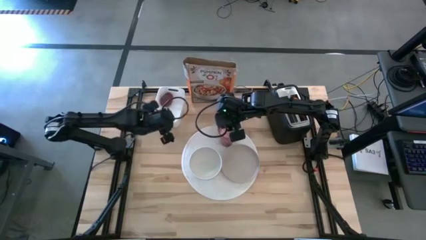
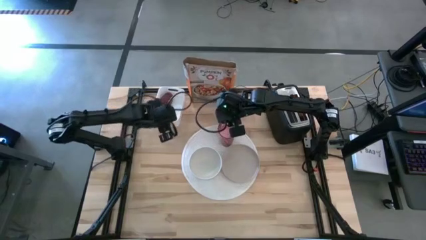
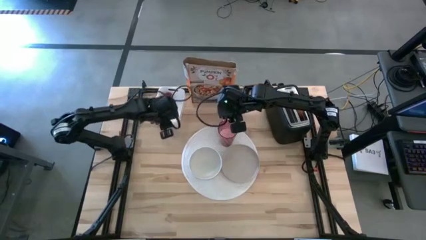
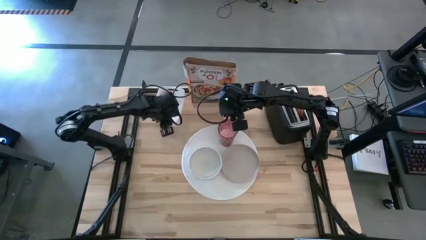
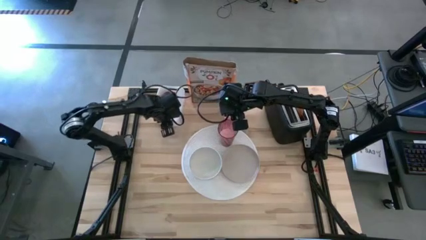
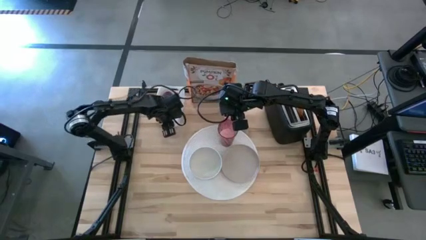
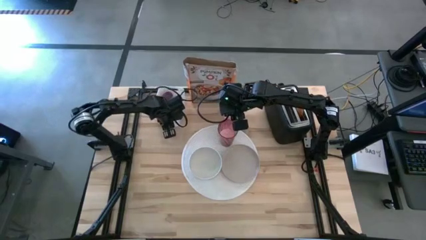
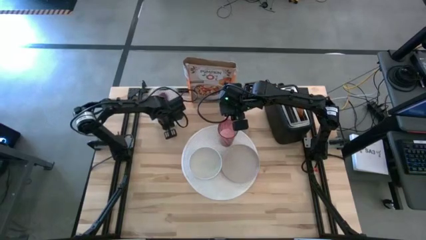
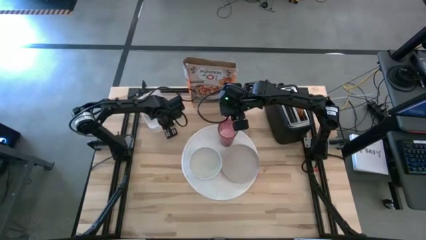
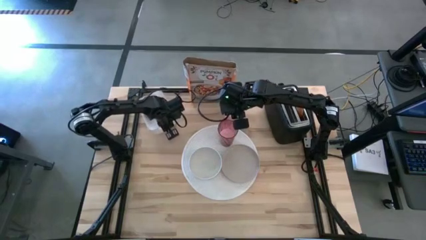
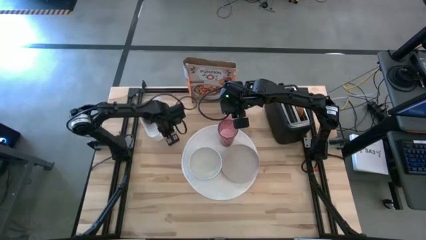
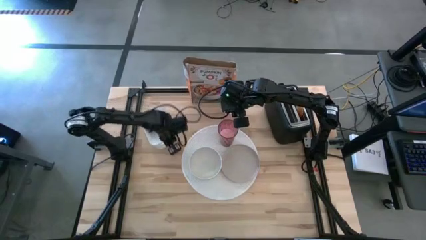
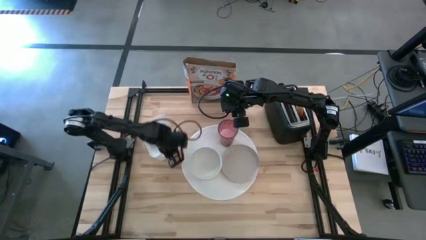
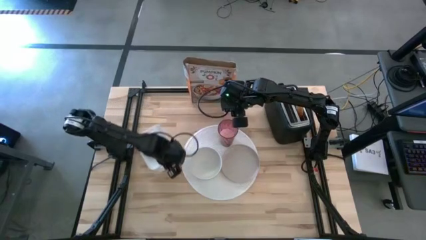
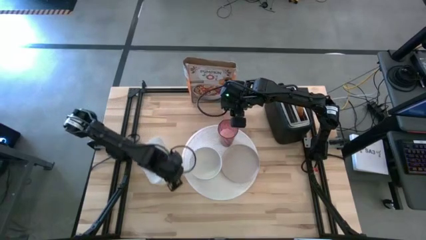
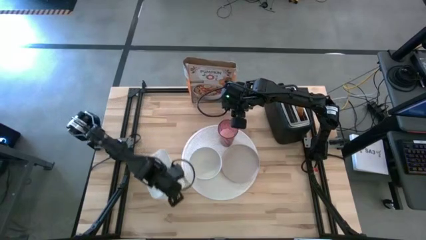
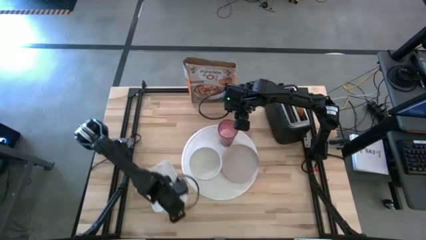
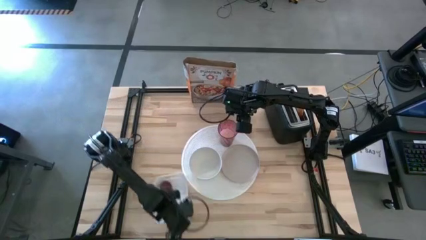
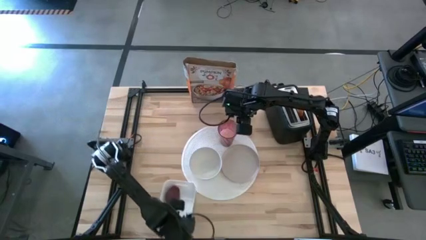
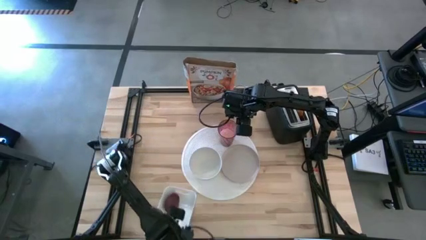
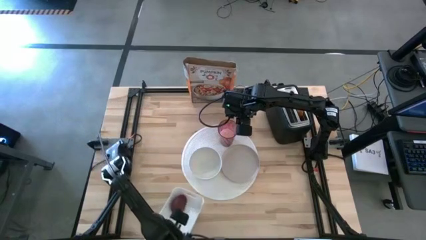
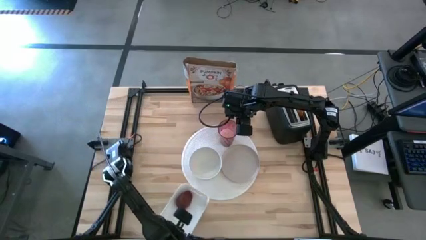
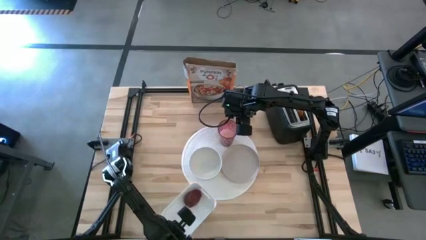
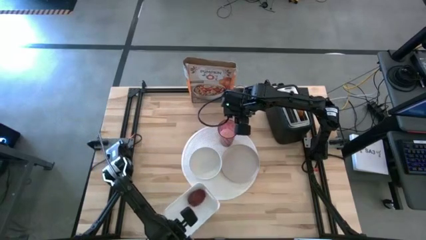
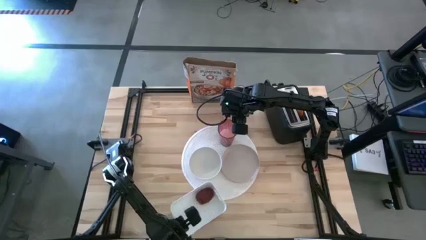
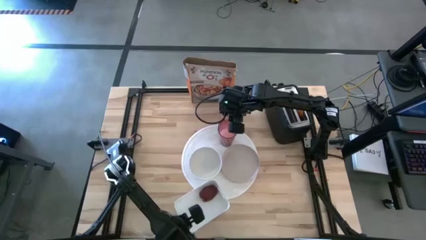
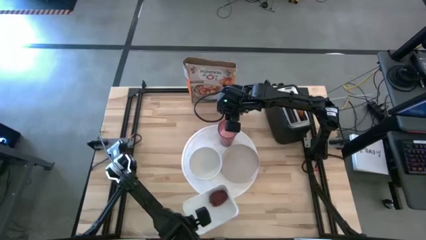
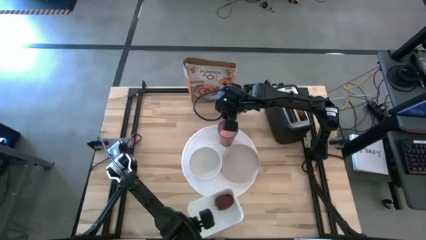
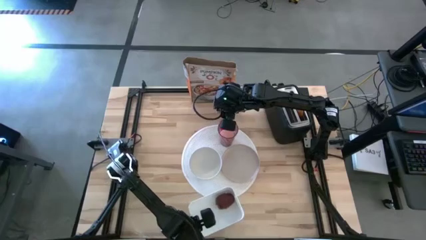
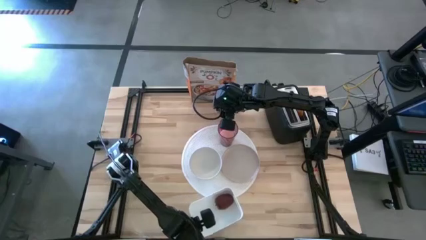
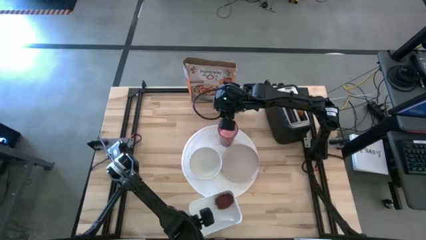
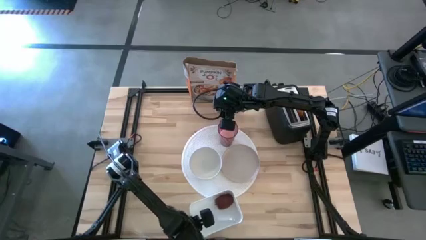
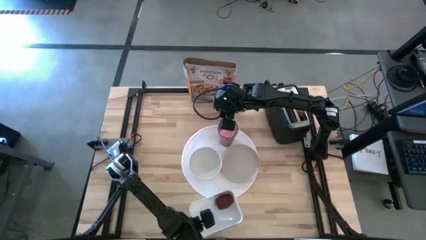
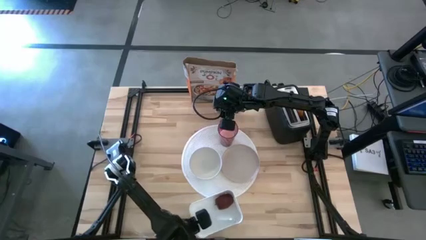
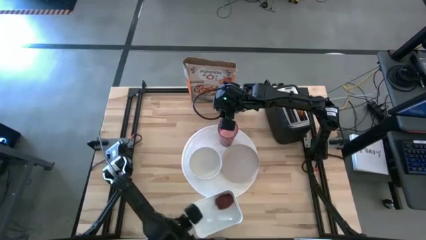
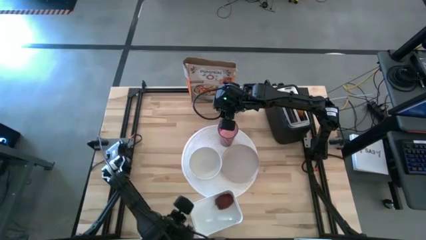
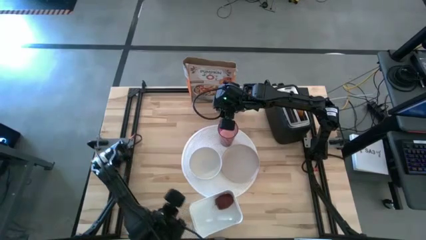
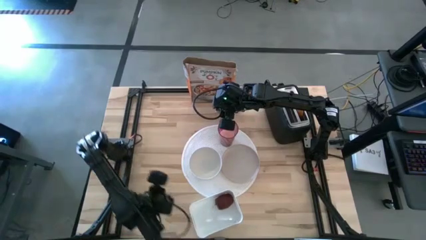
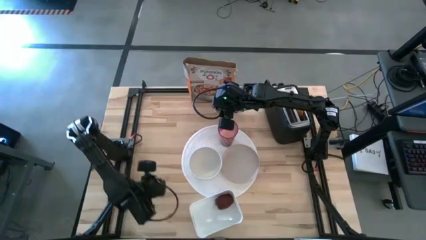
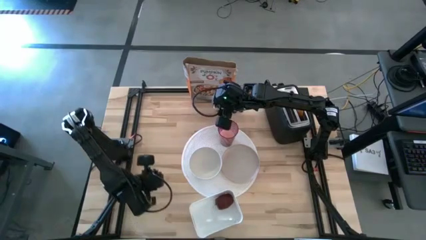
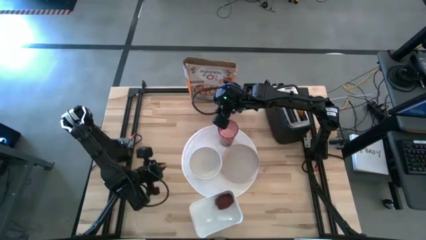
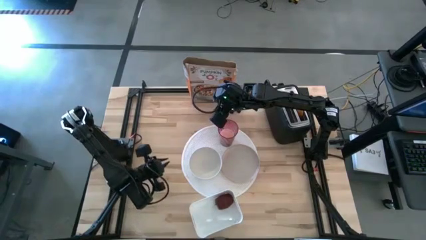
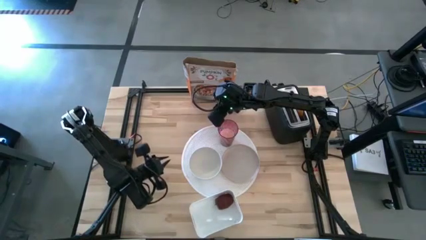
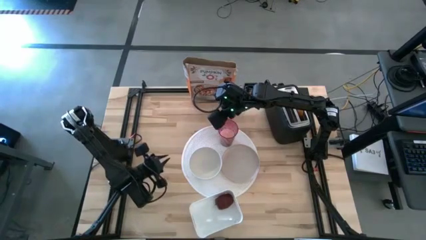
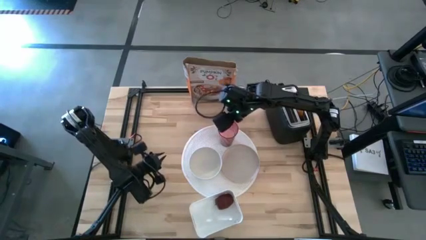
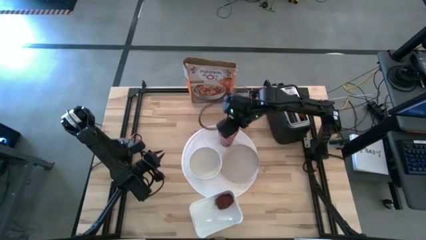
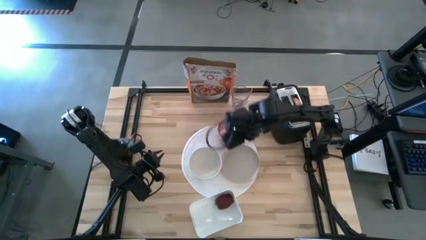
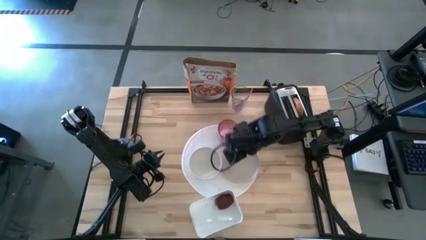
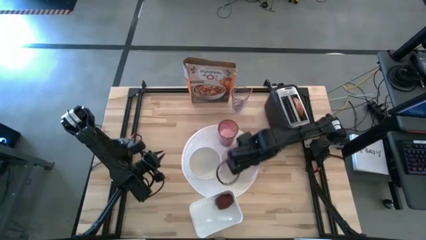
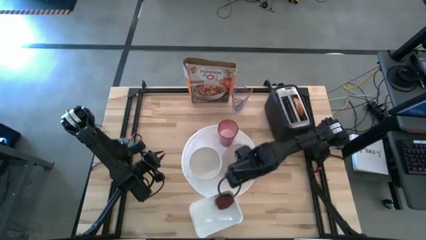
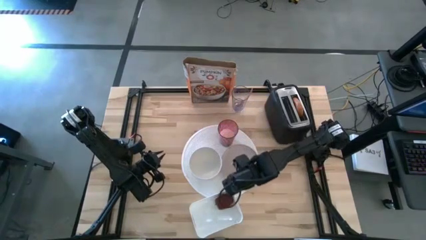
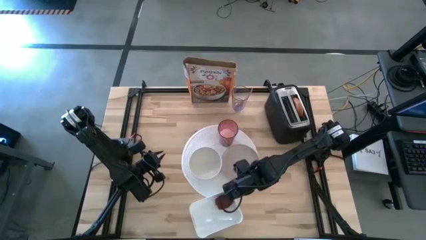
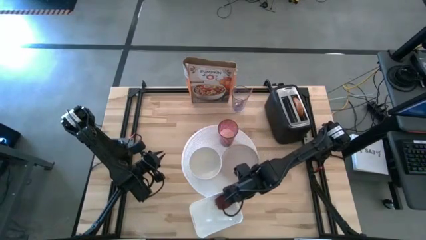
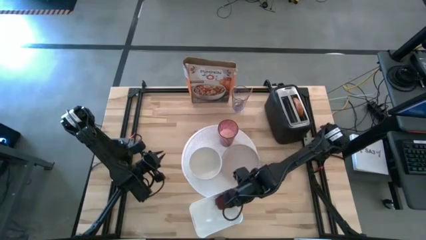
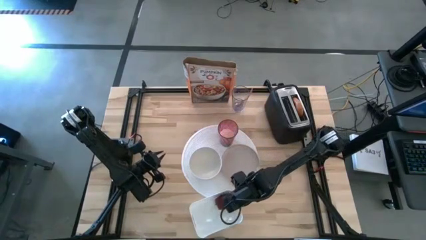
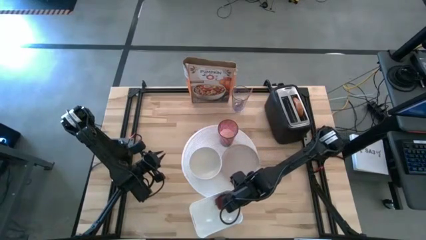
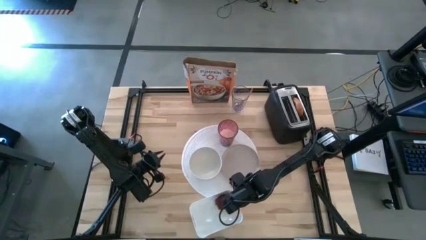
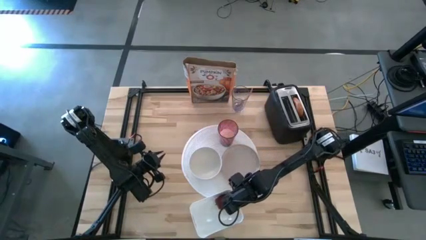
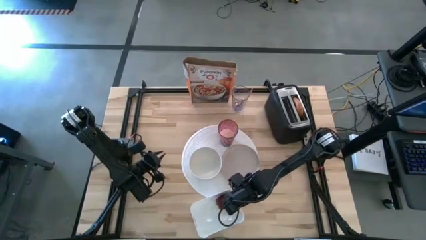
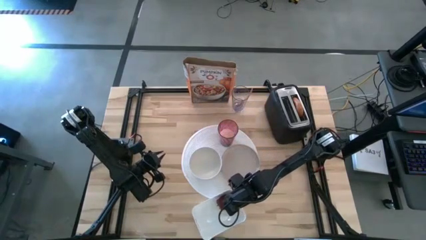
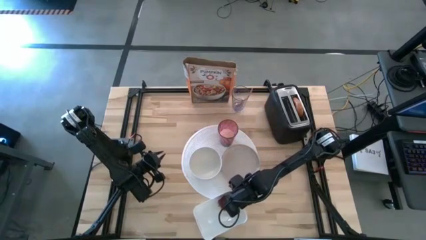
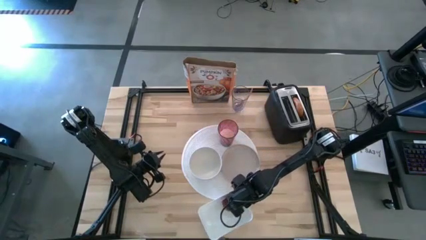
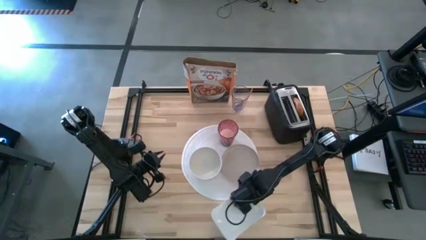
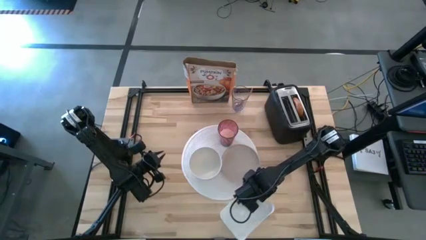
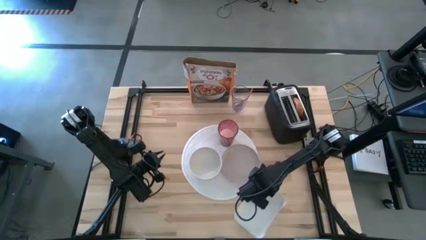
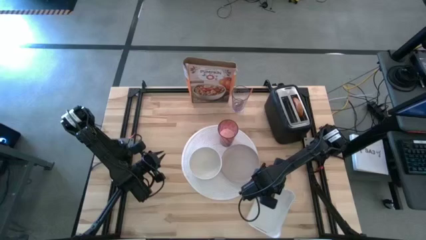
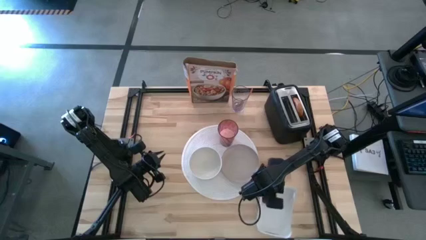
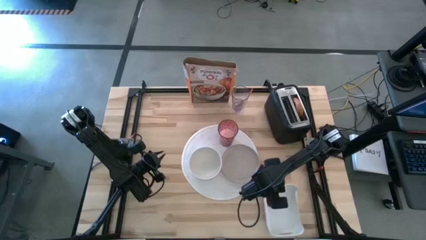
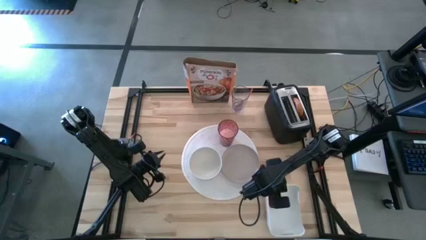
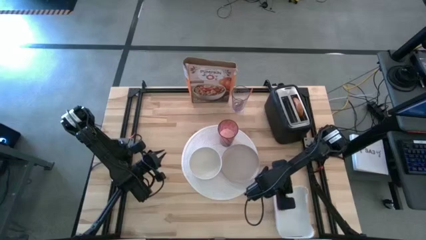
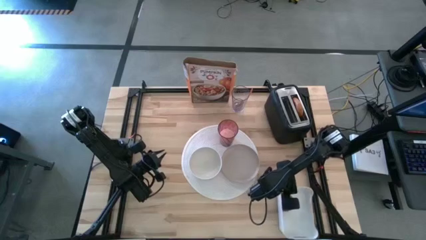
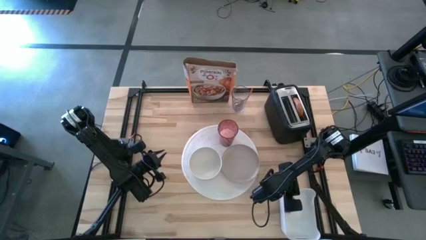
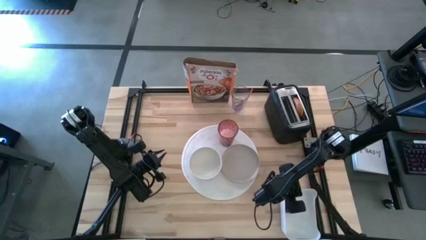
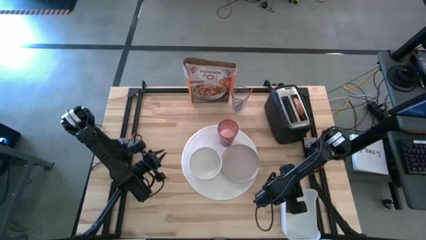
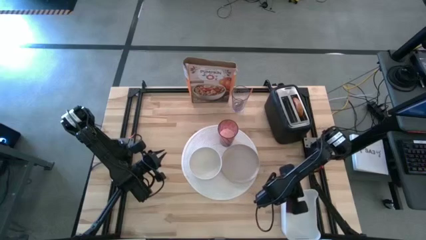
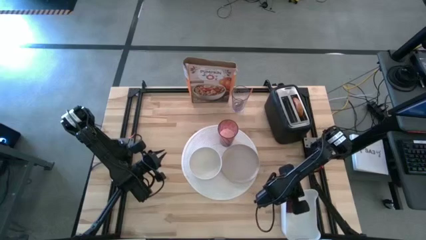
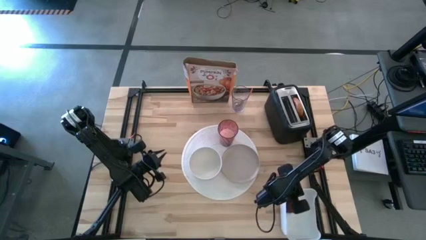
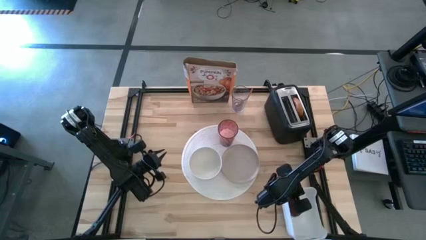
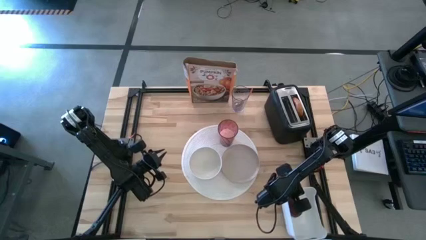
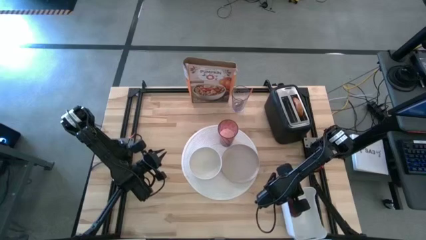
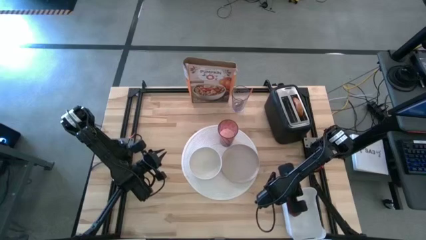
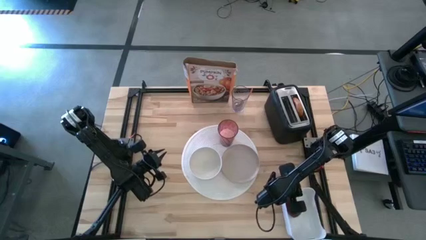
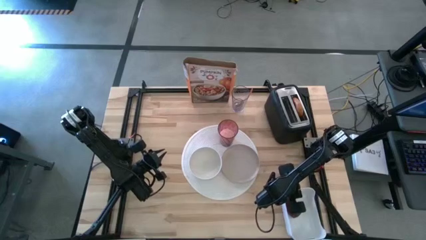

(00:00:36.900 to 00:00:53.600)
Task: Arrange a breakfast setting
Move the white bin to the bottom right of the table
